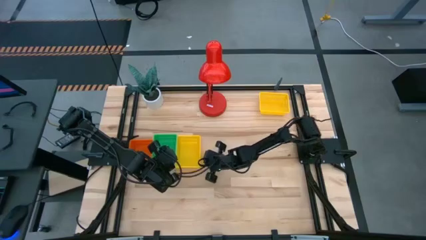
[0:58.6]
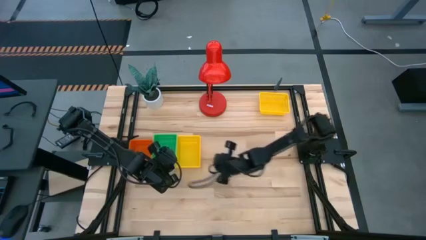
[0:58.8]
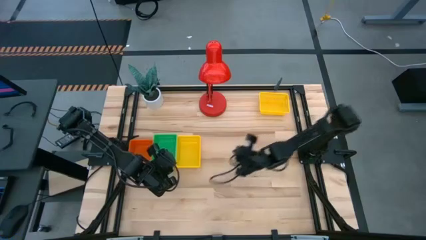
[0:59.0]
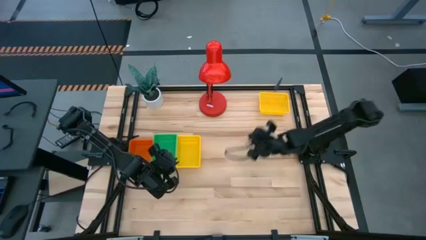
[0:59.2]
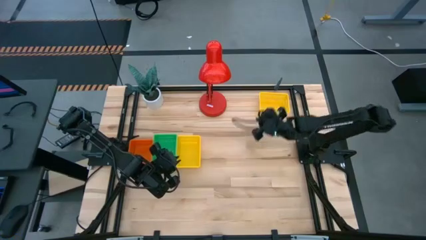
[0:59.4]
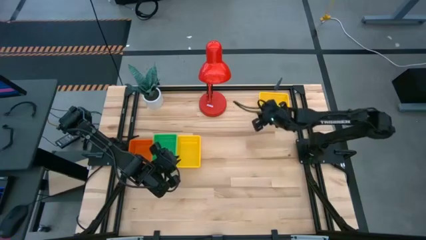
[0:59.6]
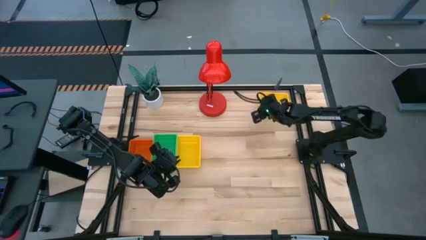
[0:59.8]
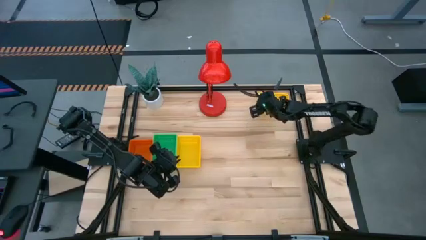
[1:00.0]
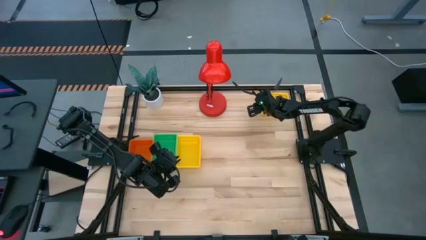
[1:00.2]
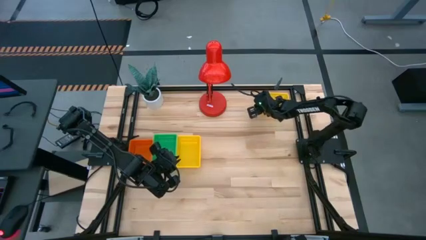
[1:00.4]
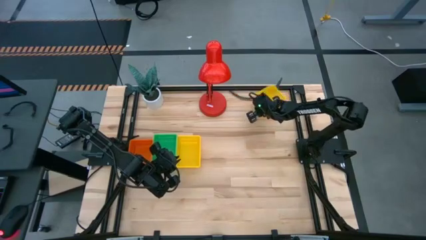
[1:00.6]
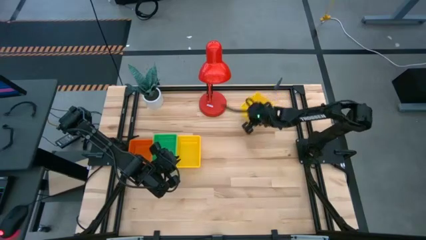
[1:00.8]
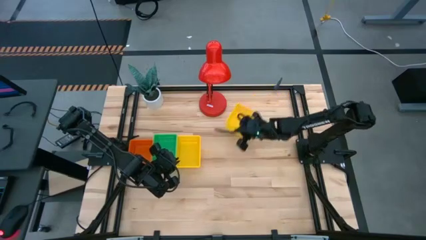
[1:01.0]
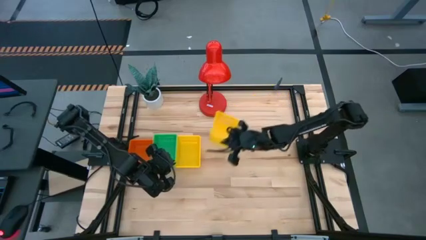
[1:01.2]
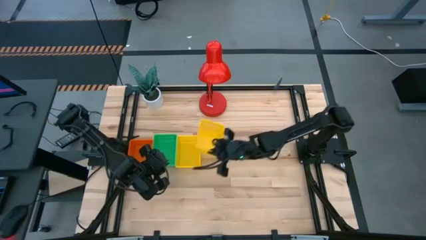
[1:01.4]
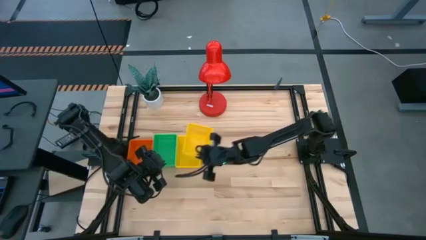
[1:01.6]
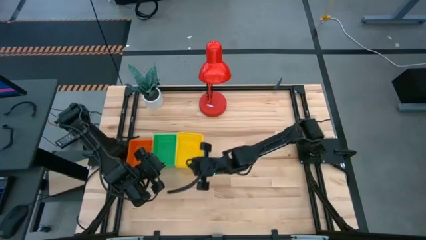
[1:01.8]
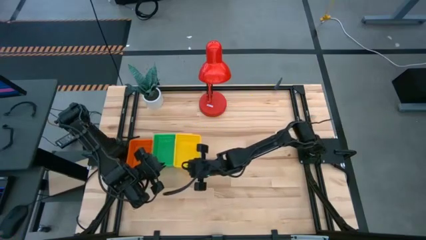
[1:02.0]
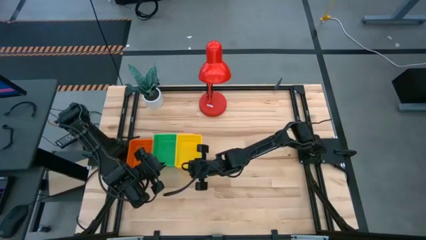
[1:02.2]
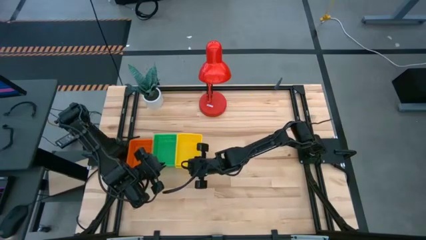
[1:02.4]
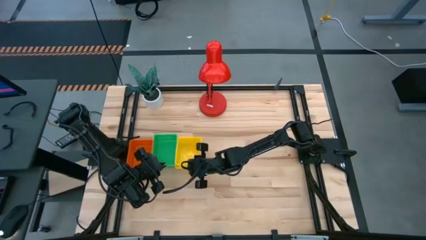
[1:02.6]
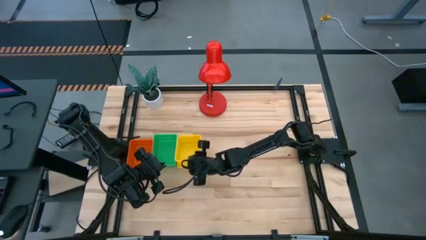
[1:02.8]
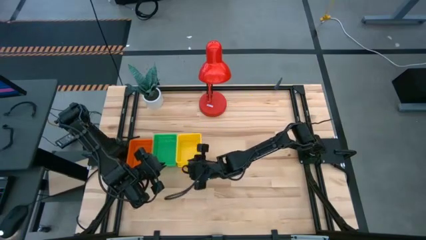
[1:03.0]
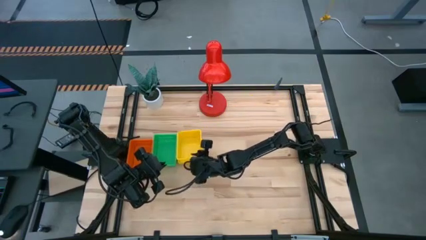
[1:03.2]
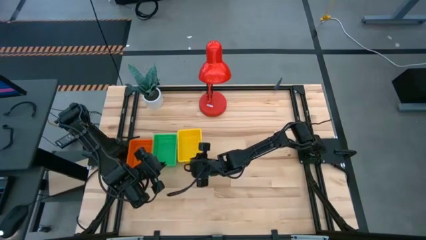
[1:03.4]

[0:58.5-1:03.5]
Stack the top yellow bin on the bottom stacked yellow bins

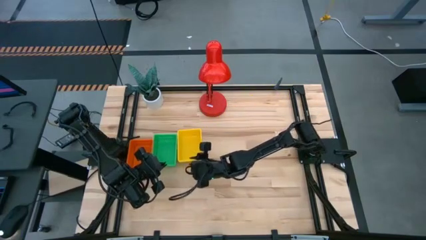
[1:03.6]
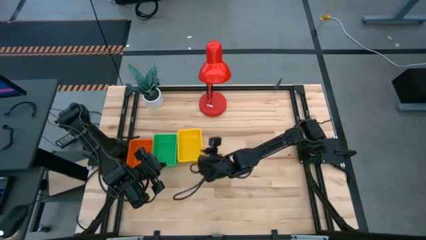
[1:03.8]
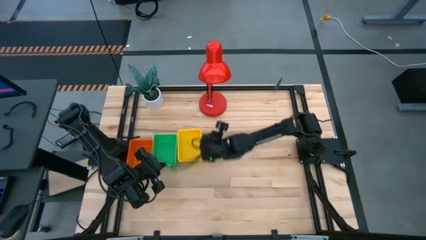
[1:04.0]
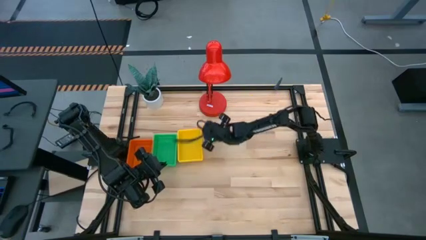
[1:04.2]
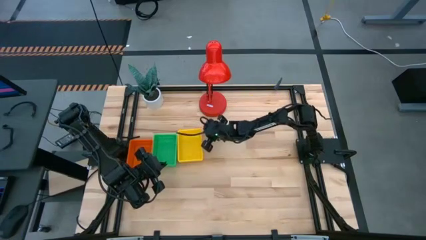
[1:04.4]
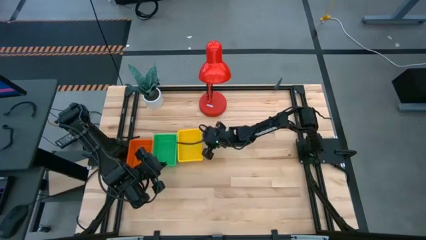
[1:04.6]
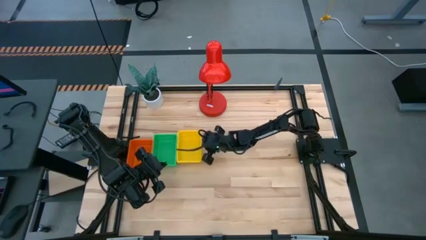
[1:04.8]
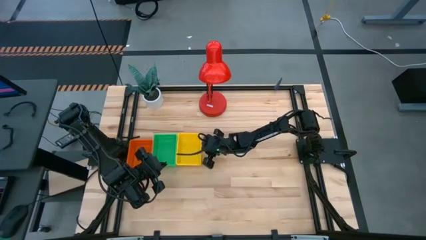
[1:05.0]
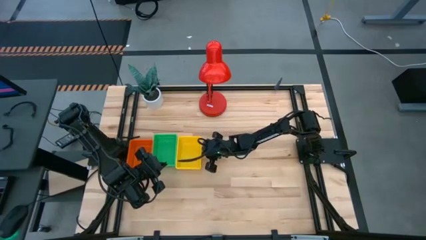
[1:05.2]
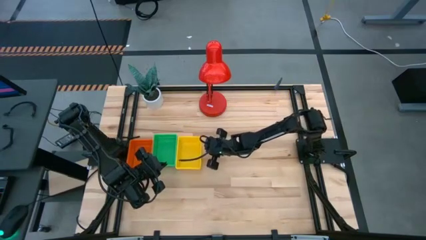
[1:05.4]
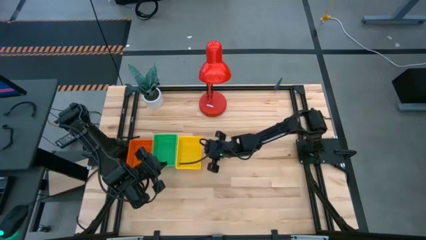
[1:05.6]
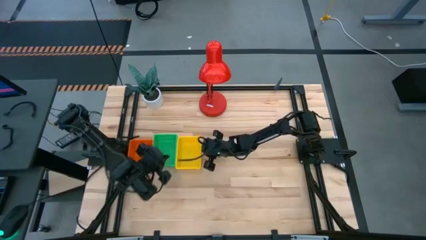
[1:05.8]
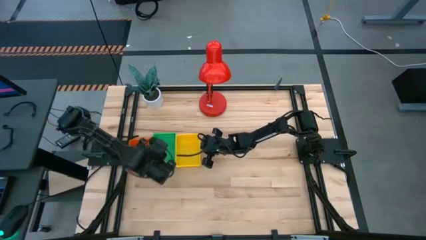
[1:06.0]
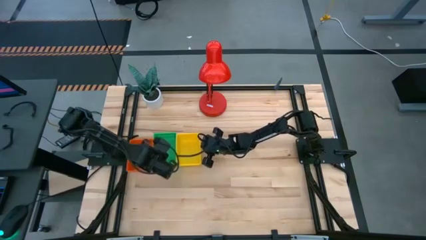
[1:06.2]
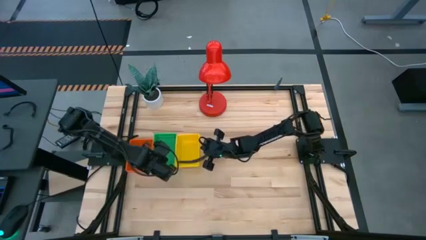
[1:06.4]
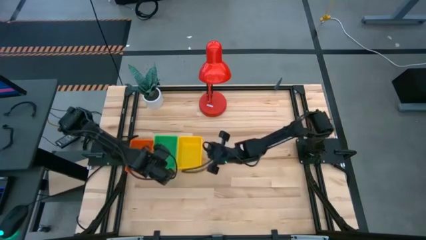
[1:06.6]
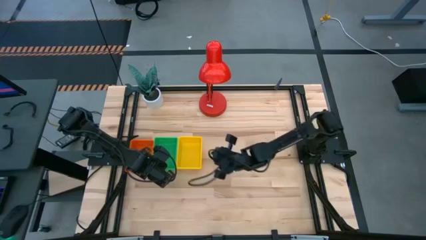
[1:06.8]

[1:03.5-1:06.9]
Adjust the stacked bins

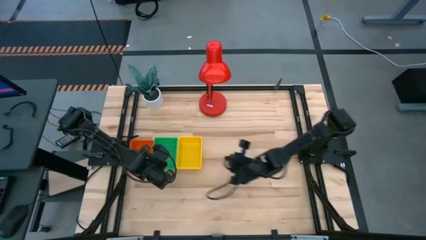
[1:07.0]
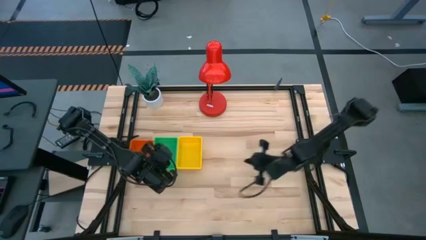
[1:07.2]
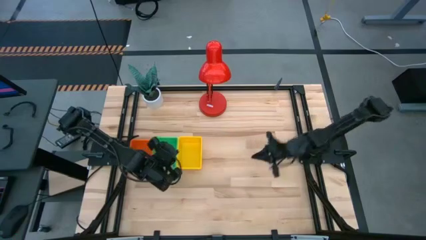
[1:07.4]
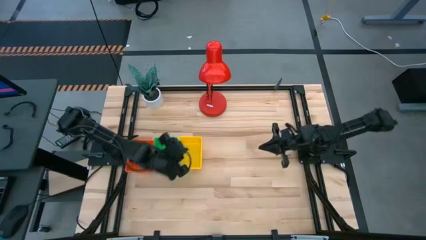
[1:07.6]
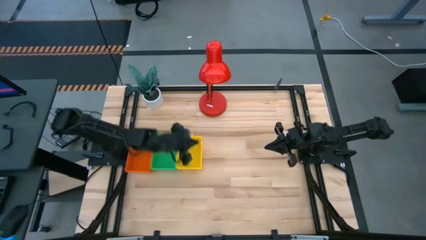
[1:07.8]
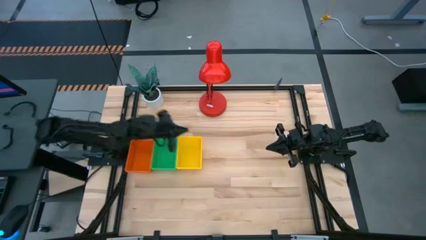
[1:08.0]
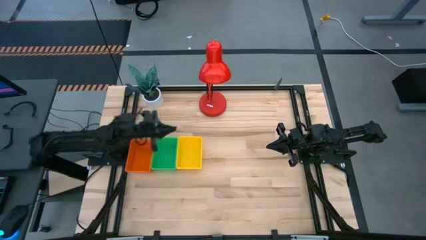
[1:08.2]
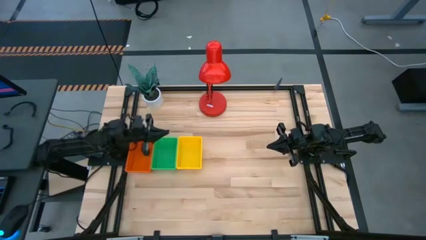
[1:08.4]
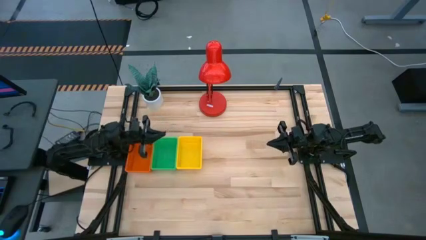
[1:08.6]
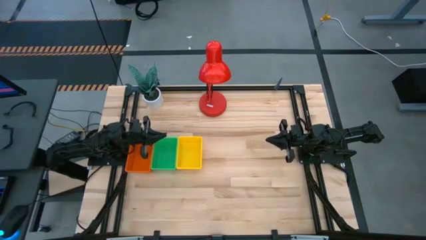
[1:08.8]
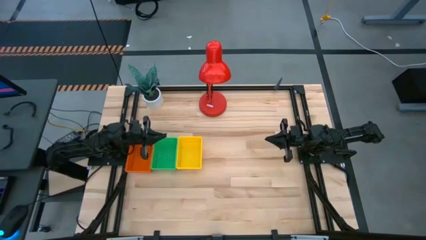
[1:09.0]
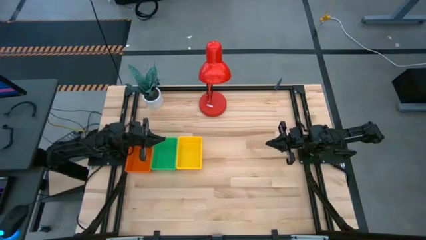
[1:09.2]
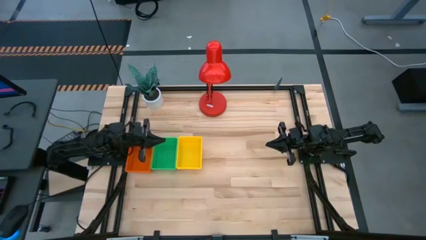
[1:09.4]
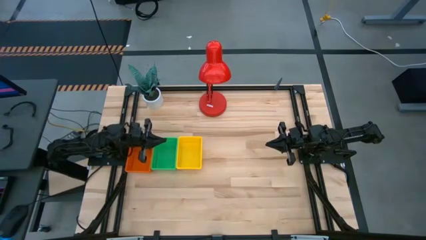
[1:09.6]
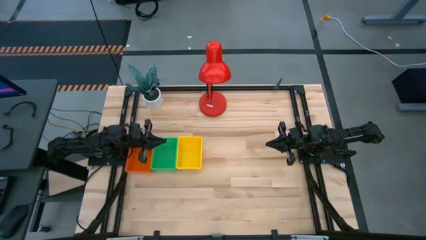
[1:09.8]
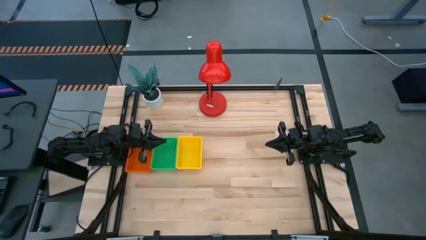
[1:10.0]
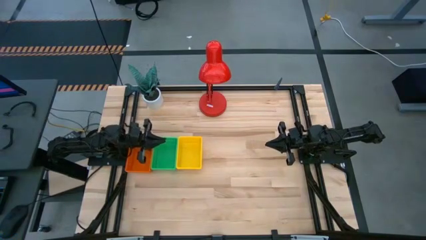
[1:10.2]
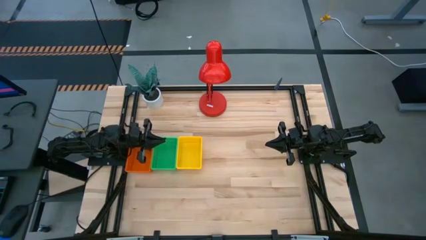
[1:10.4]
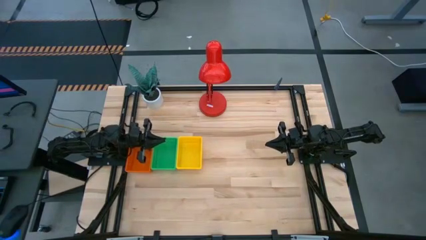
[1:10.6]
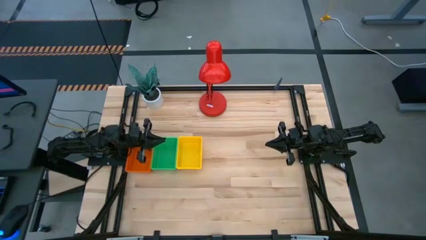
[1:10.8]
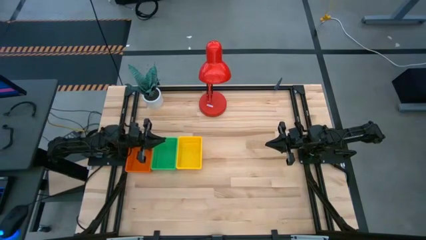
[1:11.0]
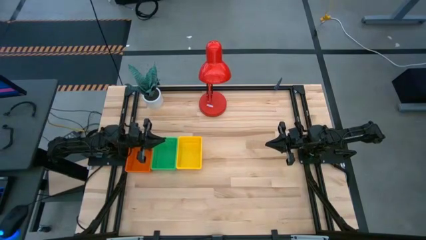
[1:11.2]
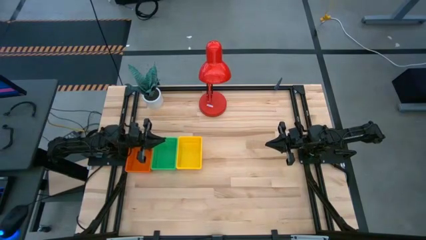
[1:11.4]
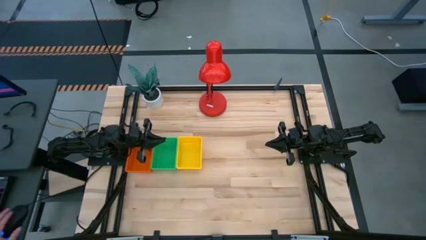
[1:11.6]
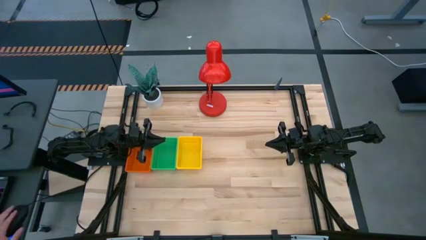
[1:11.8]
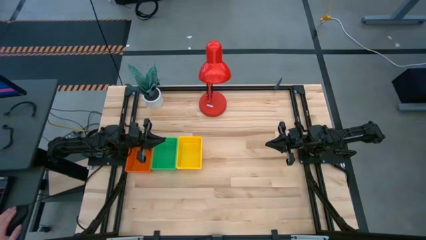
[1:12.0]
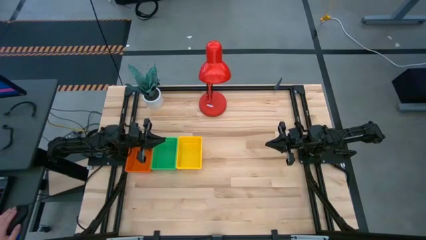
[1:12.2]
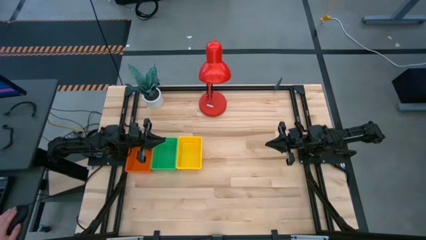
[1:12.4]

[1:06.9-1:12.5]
Return to Home Position
